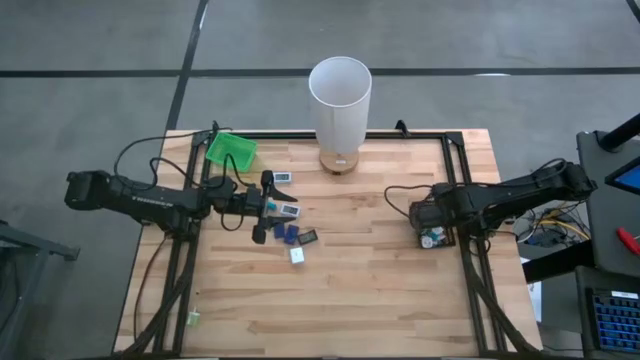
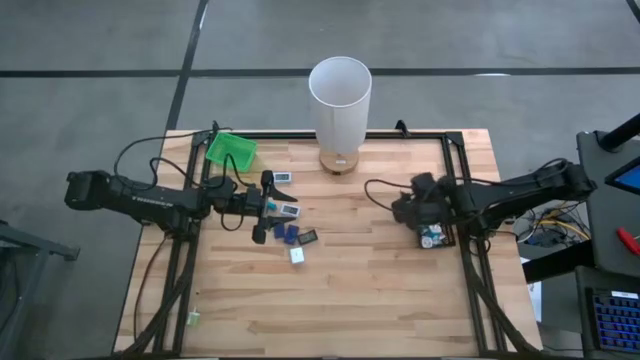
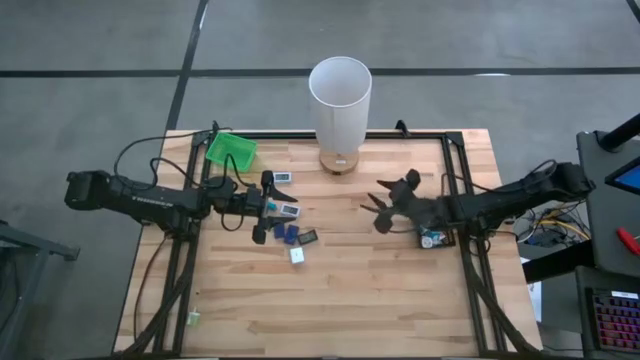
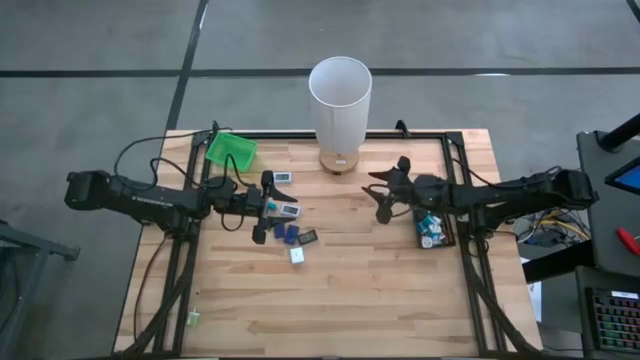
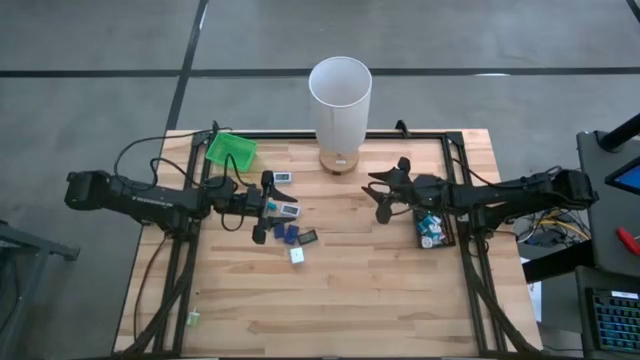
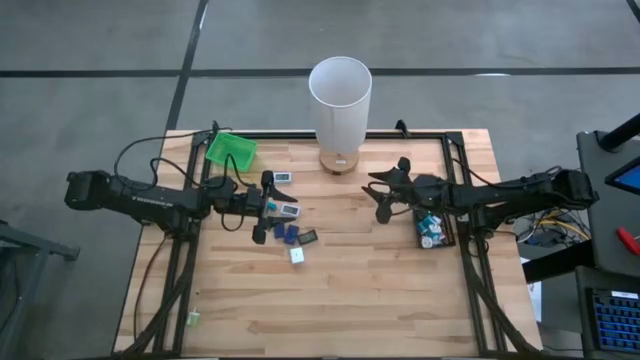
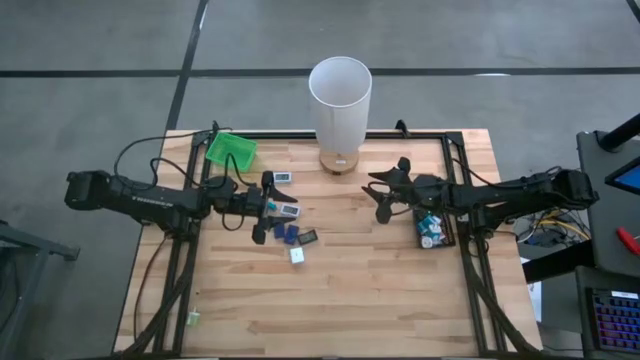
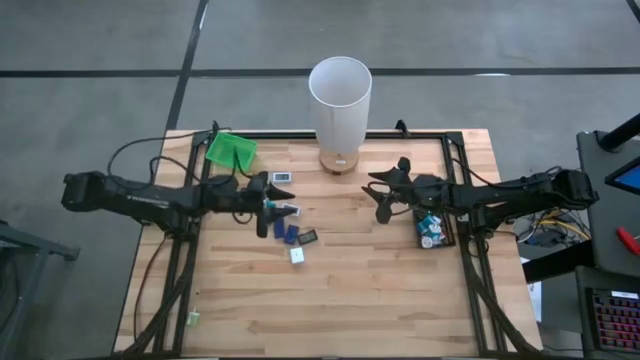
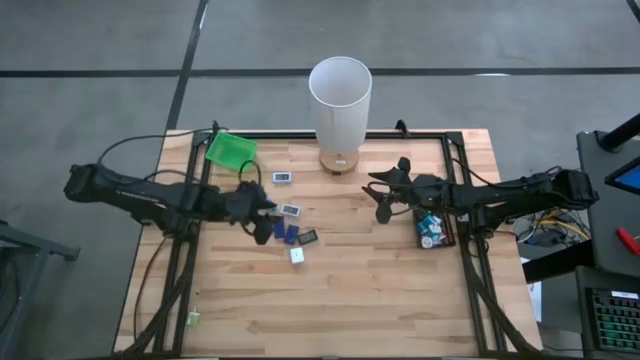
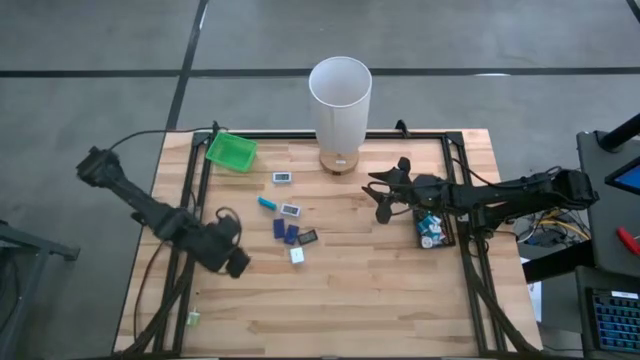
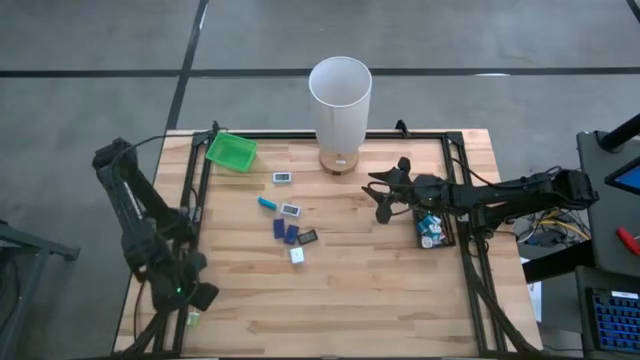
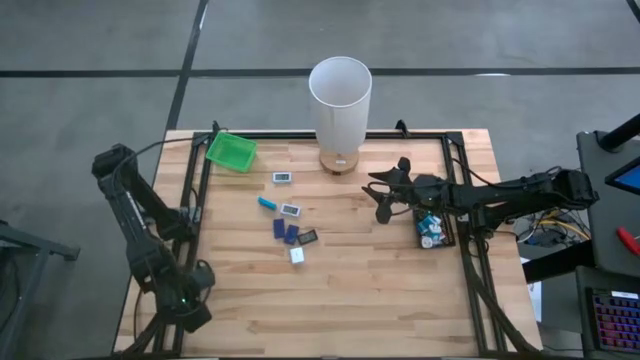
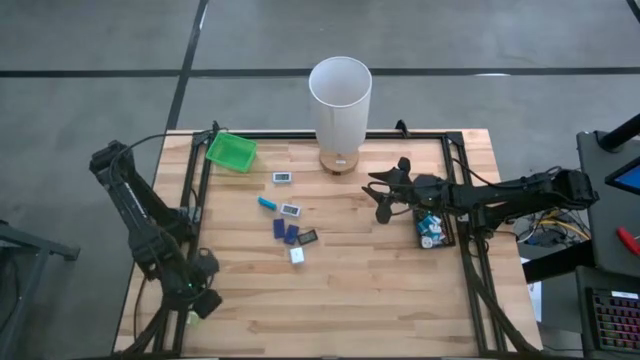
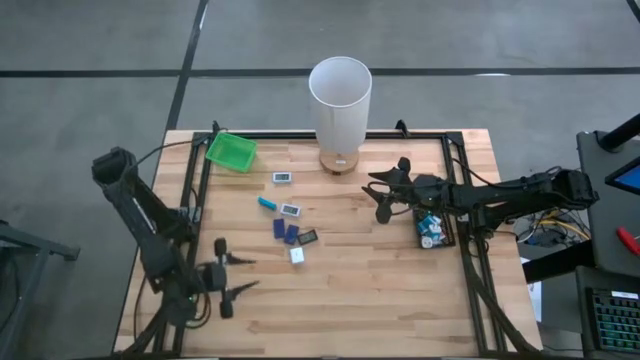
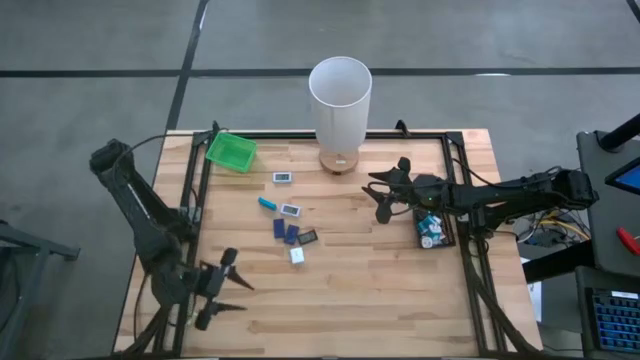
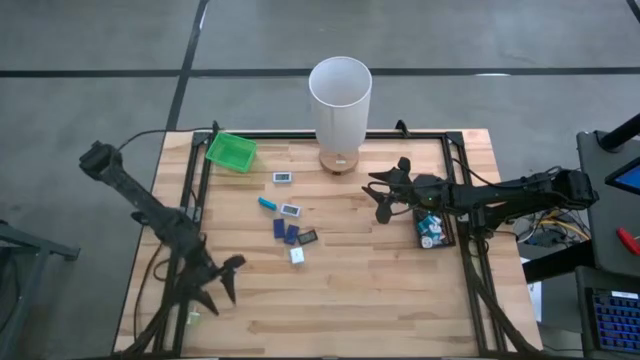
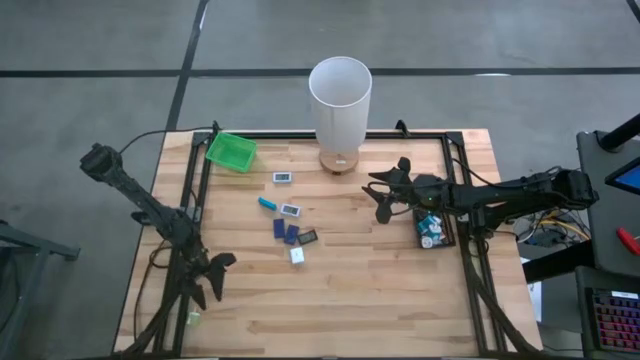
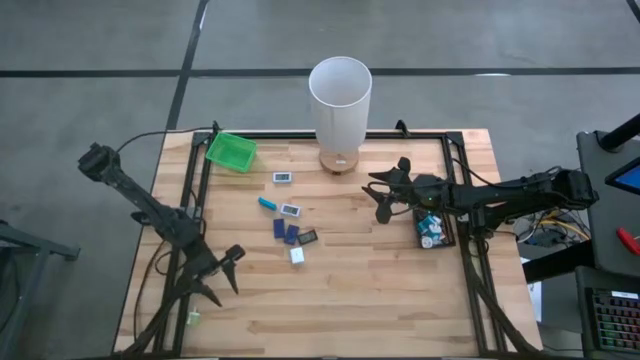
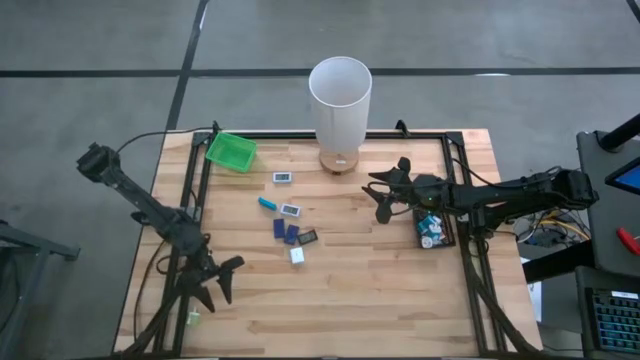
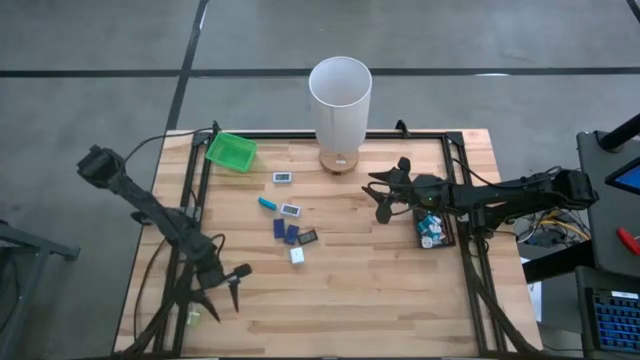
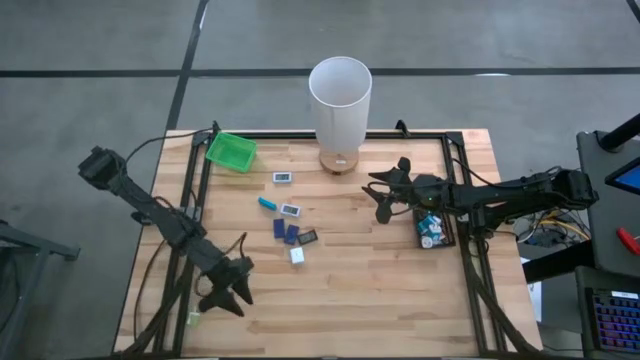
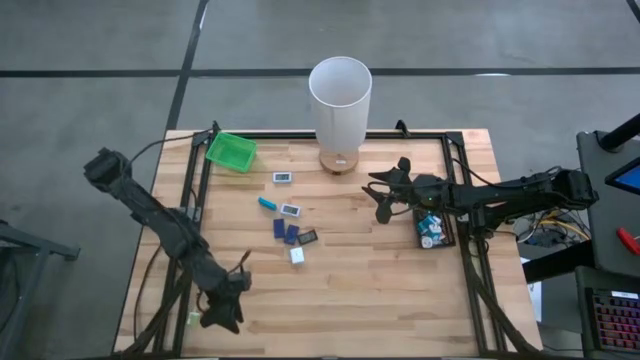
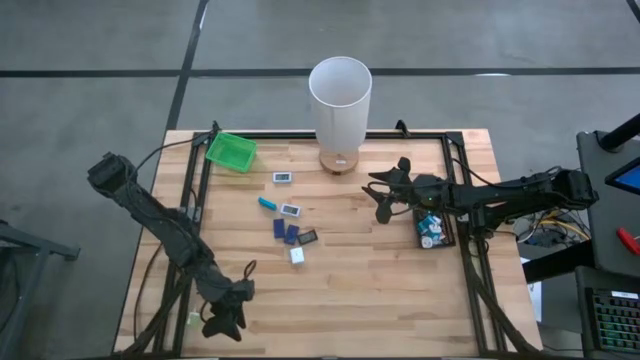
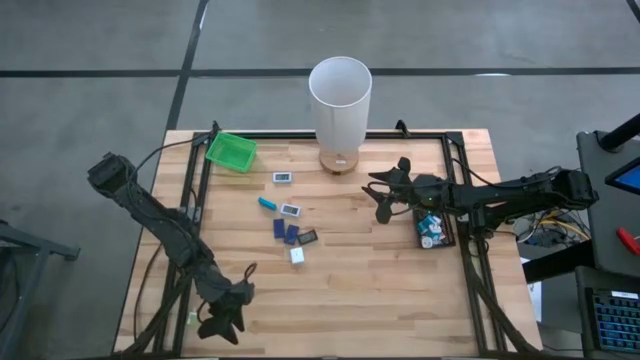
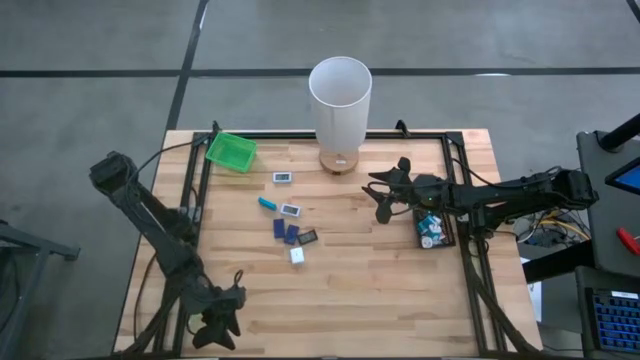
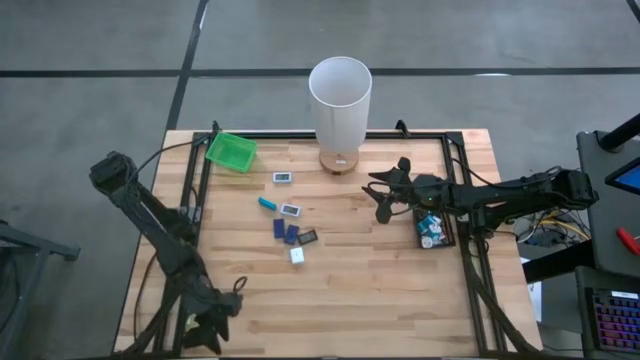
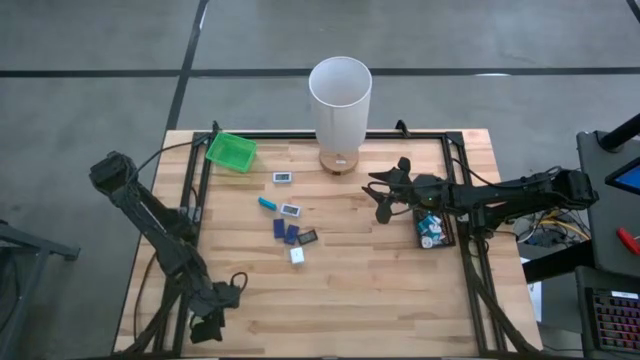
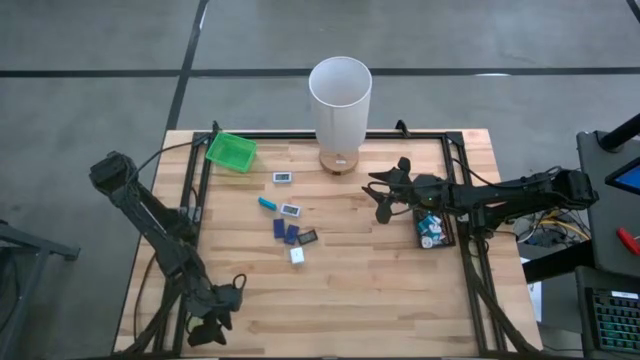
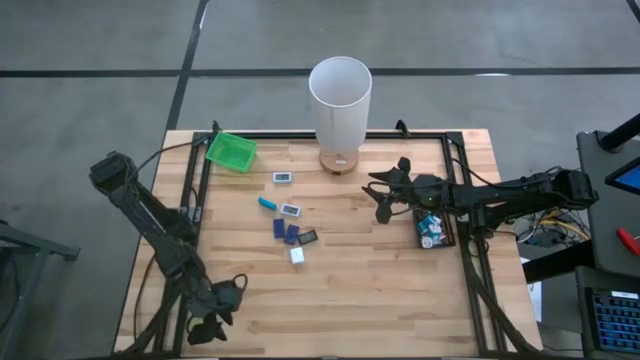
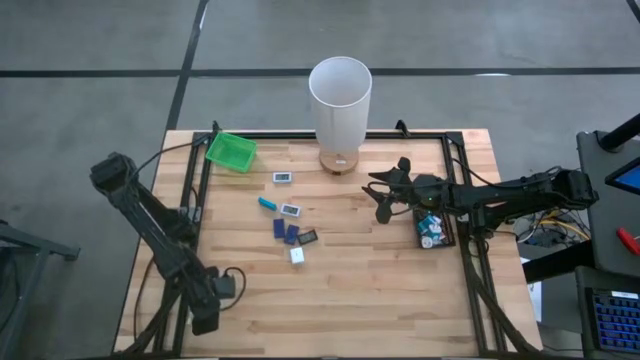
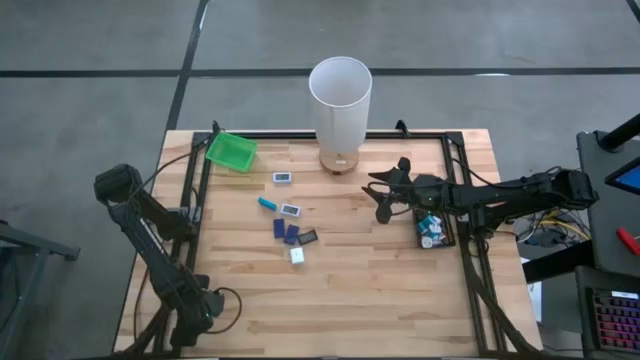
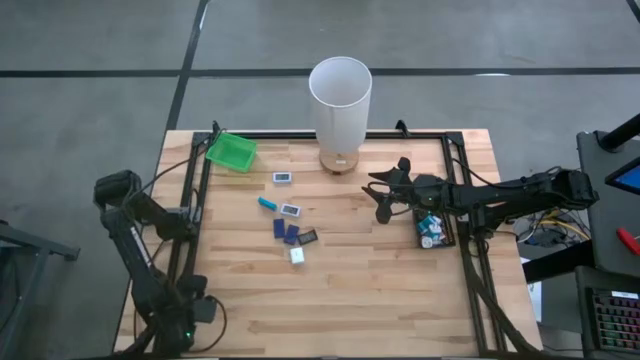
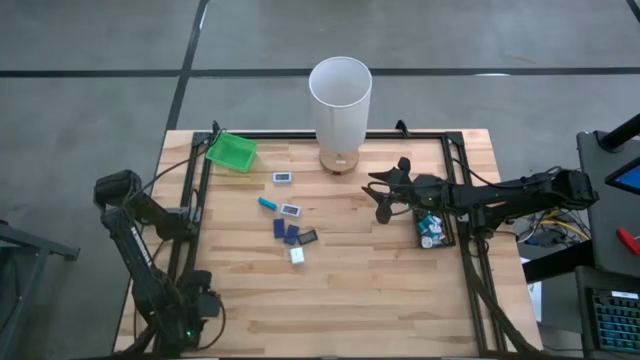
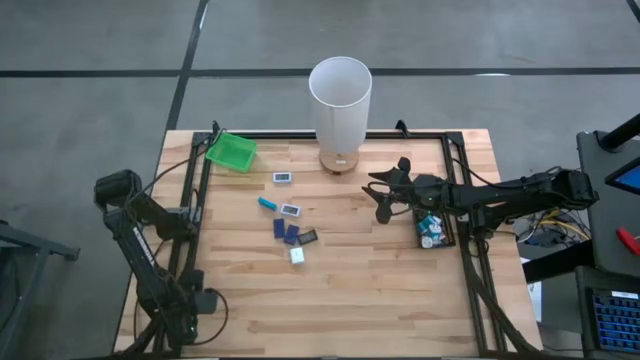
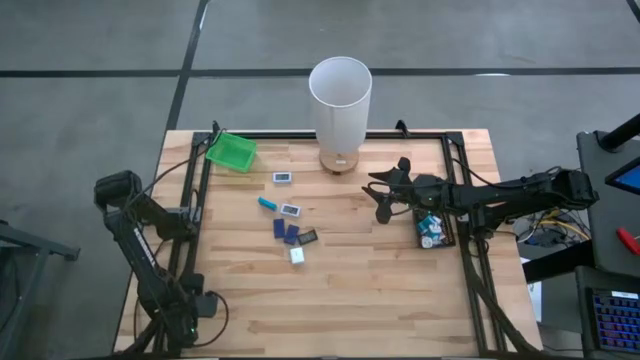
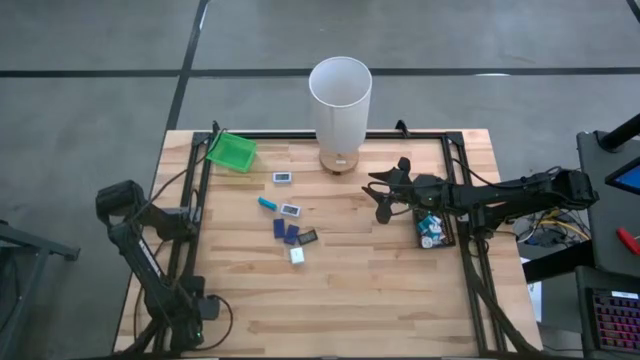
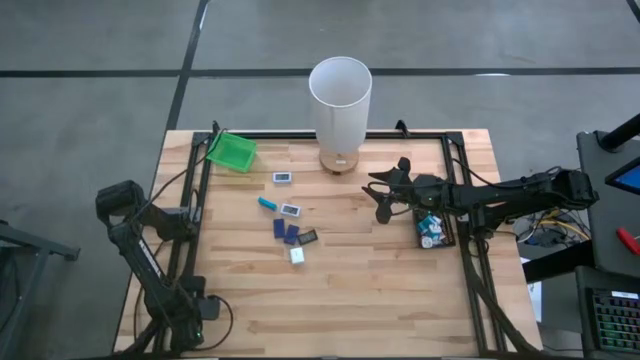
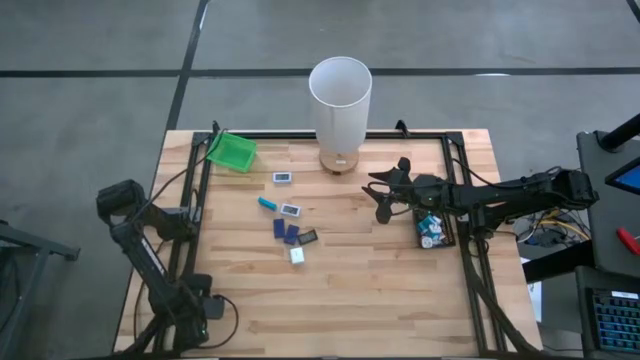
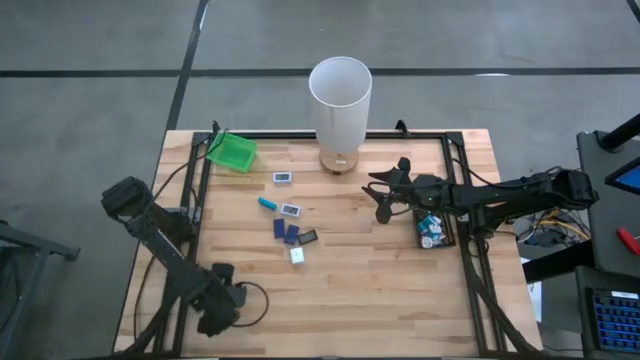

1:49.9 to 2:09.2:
Task: Pick & Place Office items
Put the green charger adapter into the black bin

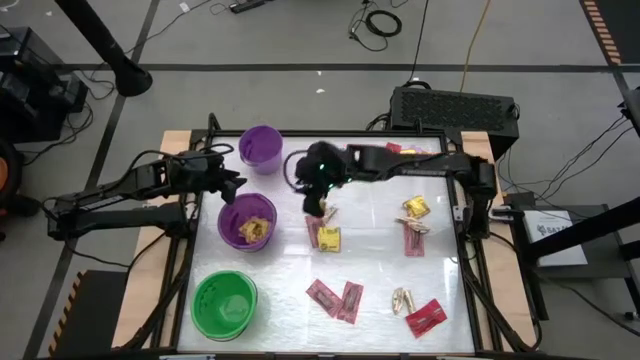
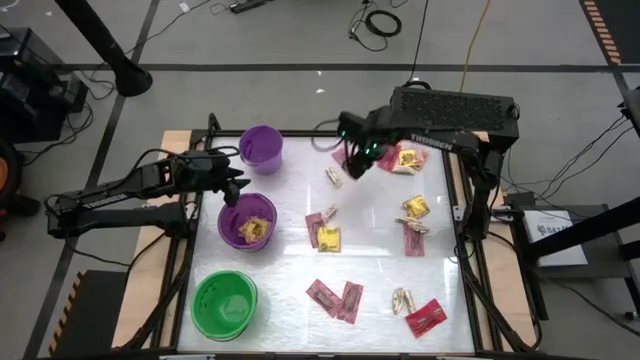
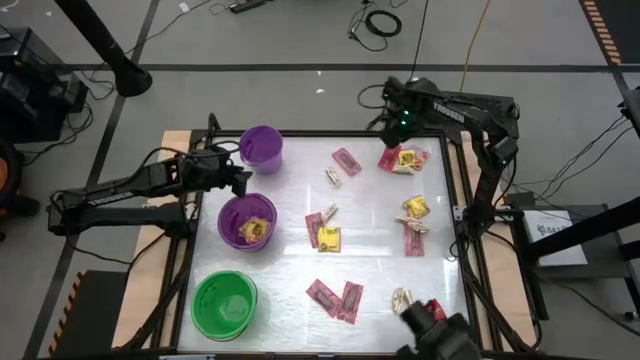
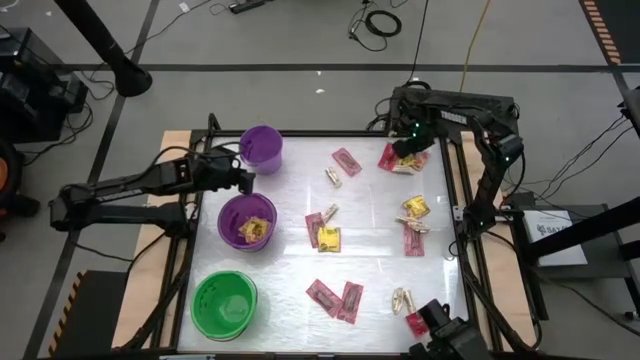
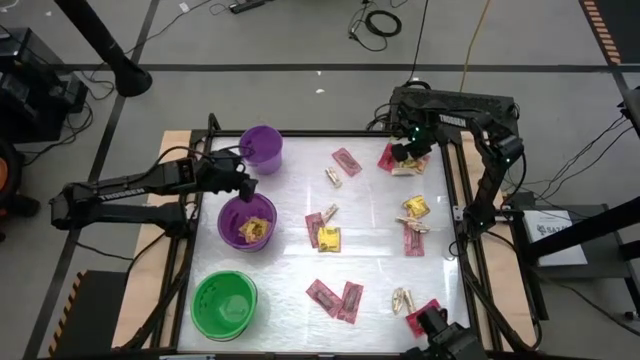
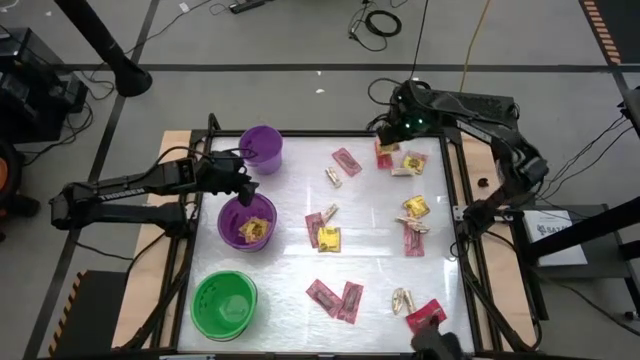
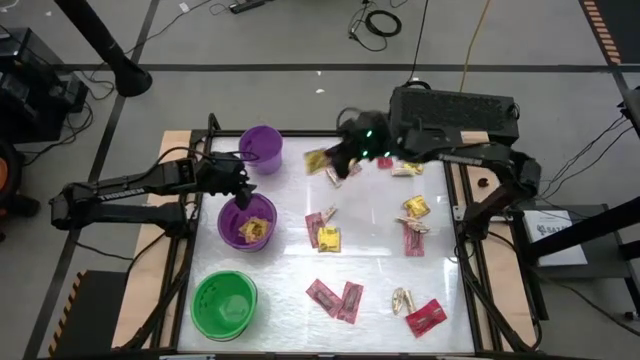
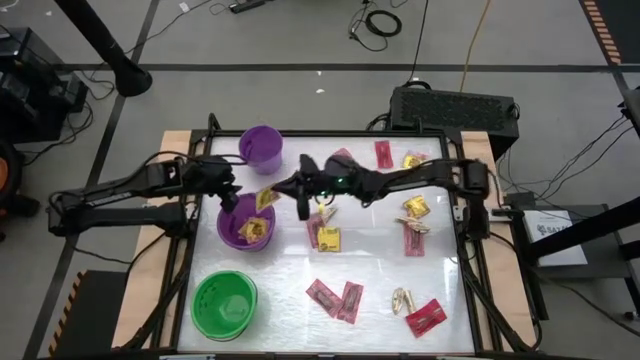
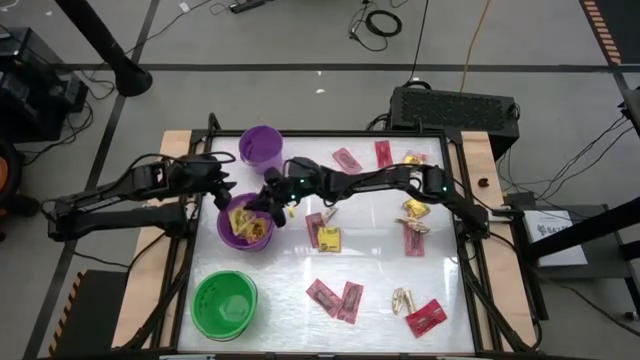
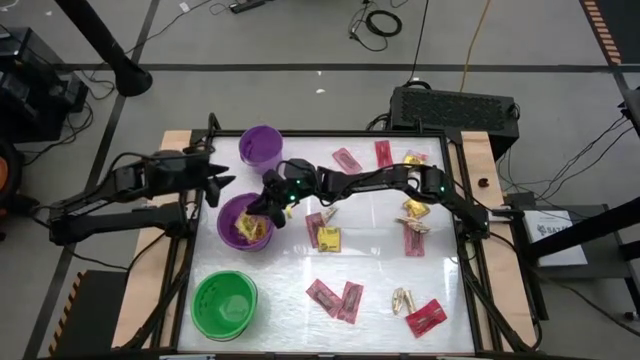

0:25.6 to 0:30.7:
Task: Sort candy by brand, put in halloween buckets
Put the yellow candy into the bottom purple bucket
